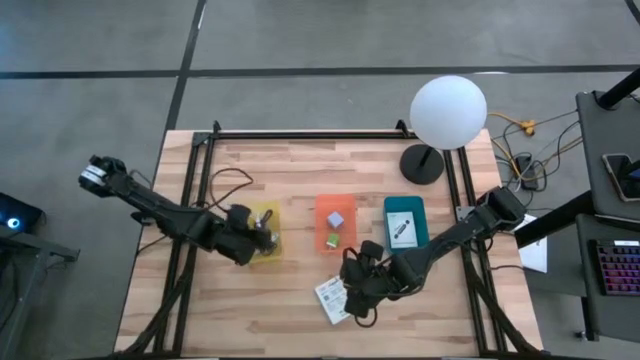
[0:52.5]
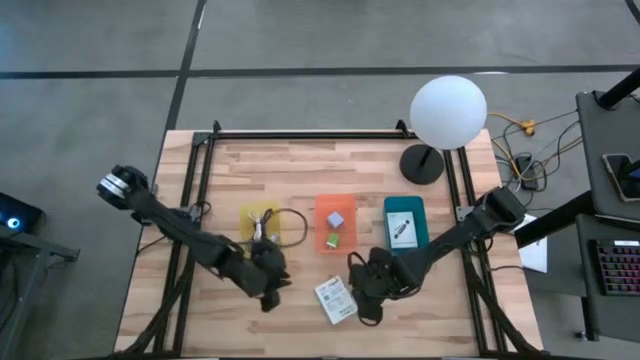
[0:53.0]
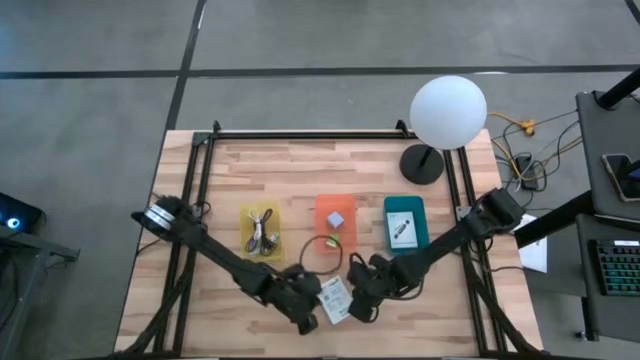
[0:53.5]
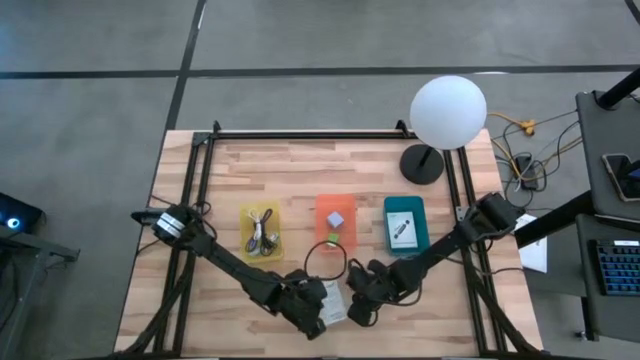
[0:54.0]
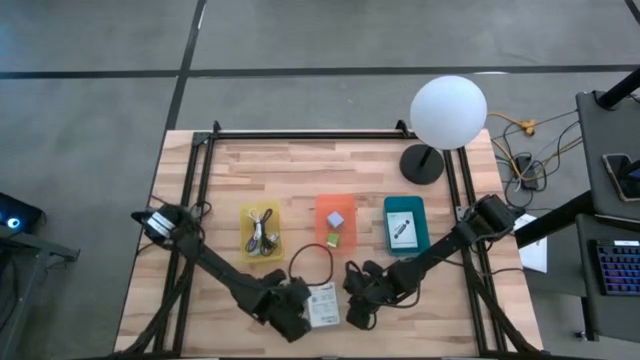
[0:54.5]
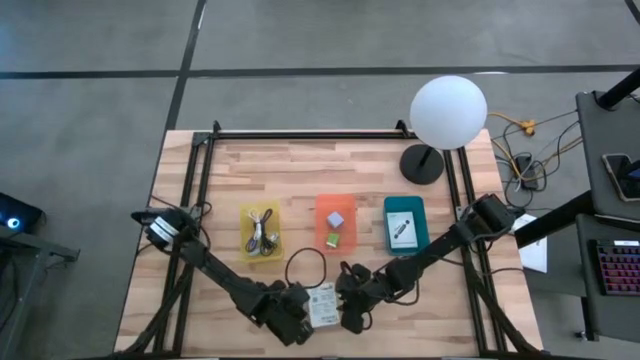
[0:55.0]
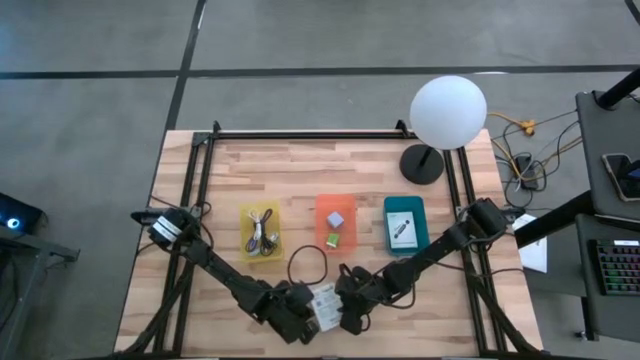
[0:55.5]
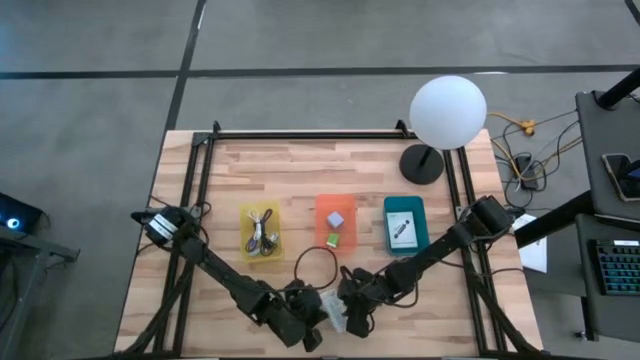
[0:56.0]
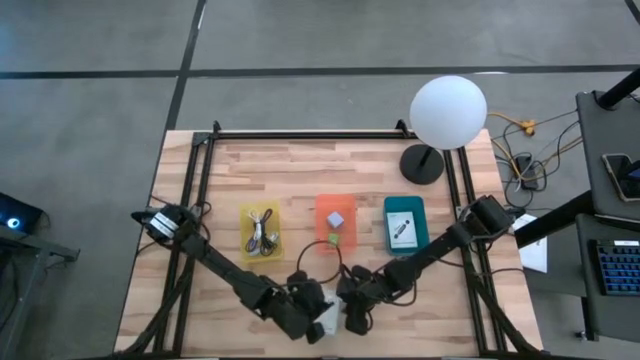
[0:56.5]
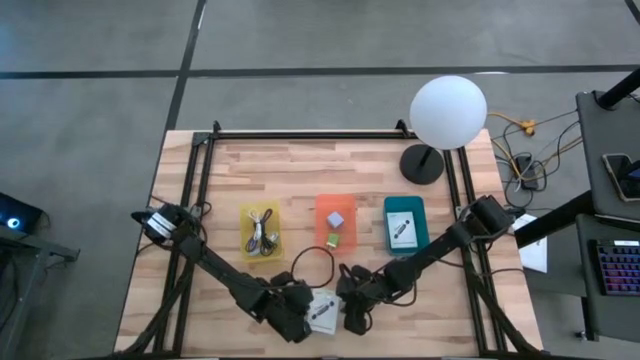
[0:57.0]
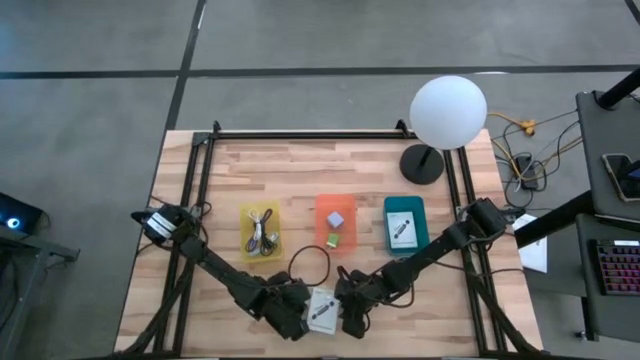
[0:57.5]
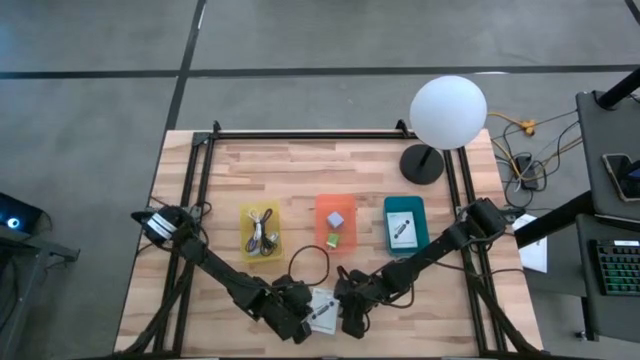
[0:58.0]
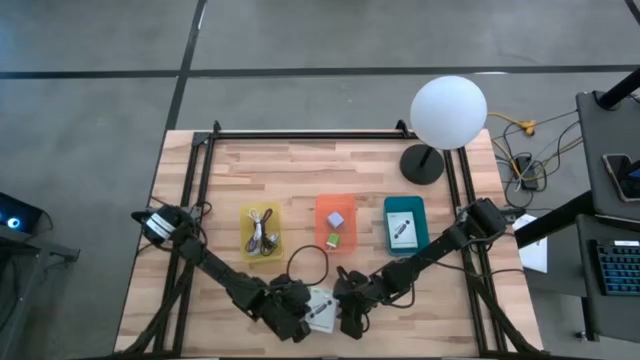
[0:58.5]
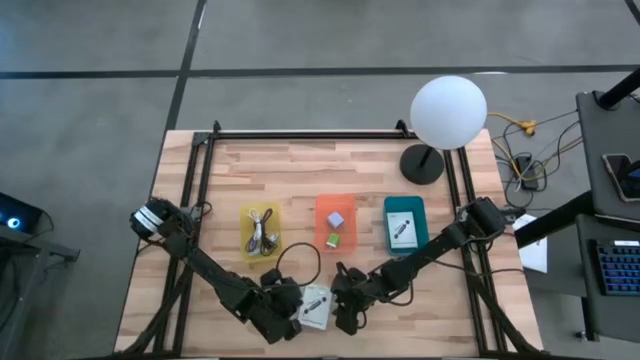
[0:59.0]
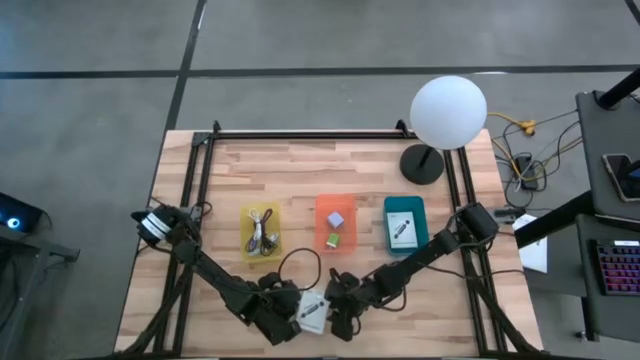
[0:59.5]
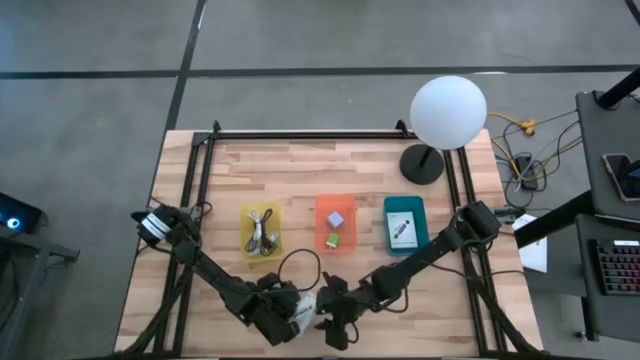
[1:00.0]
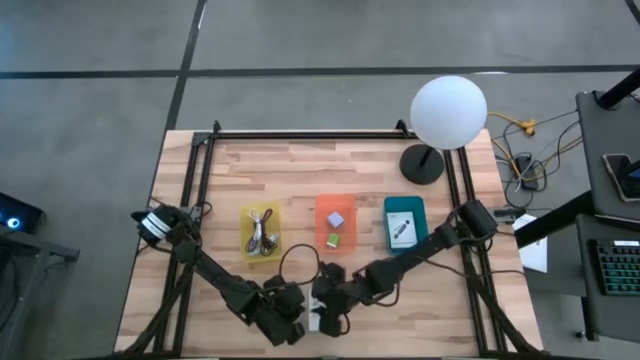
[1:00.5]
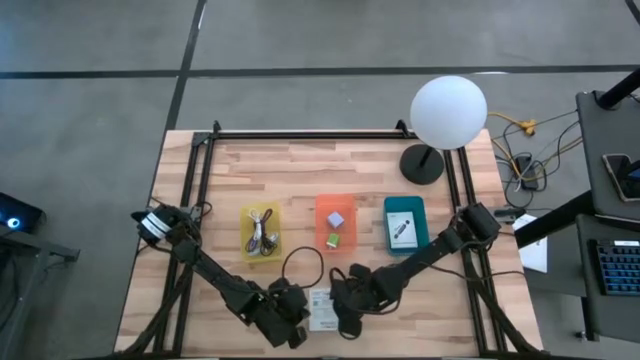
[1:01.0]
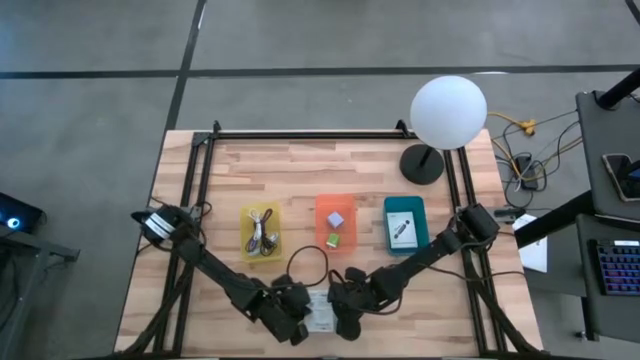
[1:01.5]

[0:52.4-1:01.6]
Task: Pick and place items into bin
Put the white card reader box into the blue bin

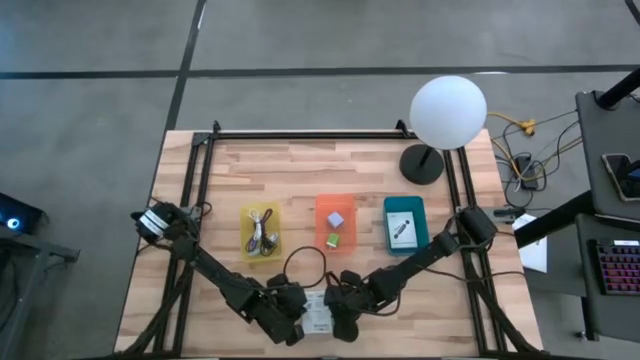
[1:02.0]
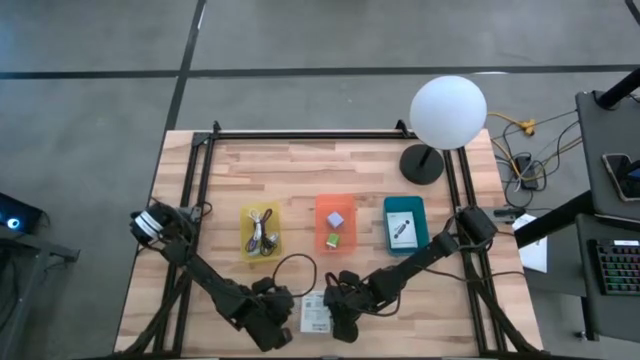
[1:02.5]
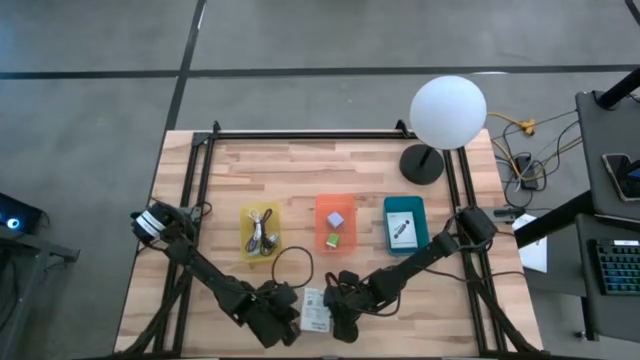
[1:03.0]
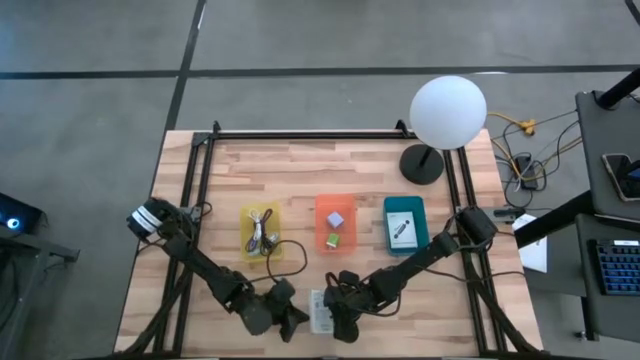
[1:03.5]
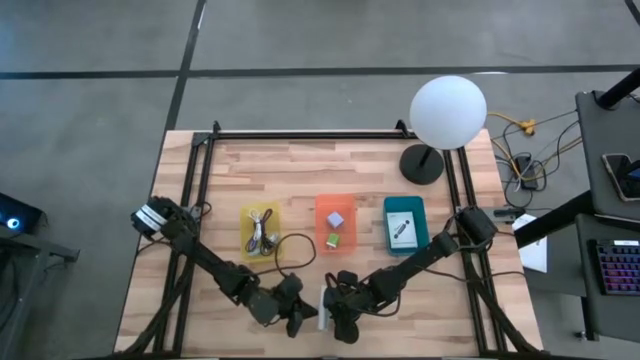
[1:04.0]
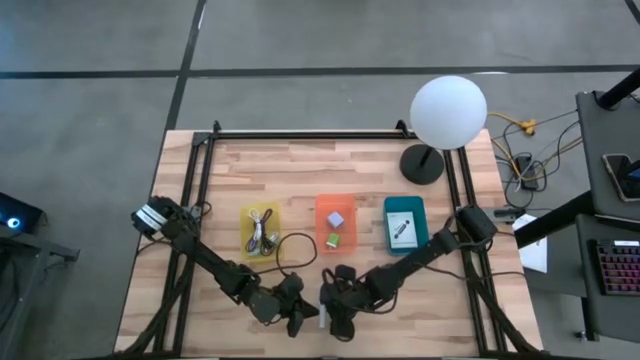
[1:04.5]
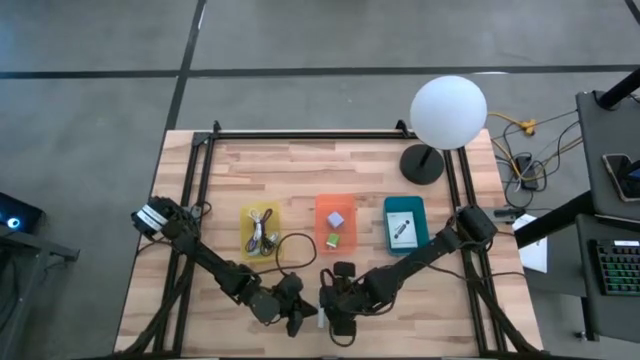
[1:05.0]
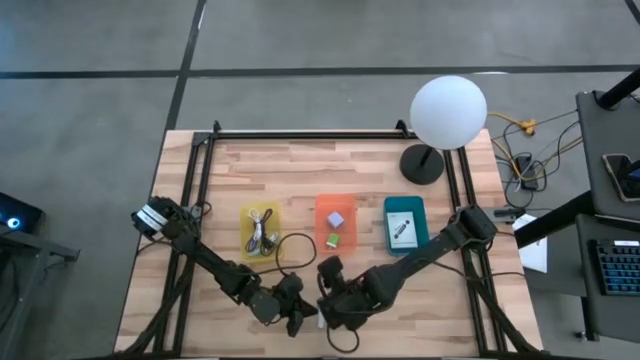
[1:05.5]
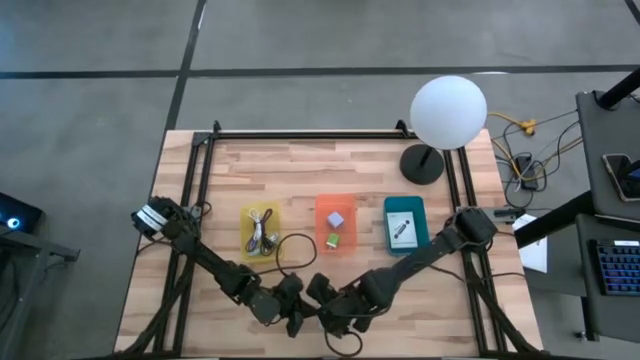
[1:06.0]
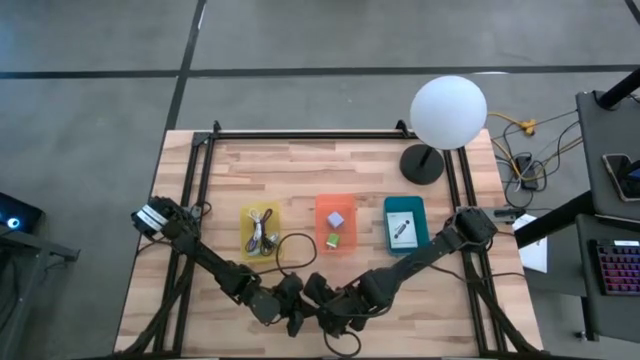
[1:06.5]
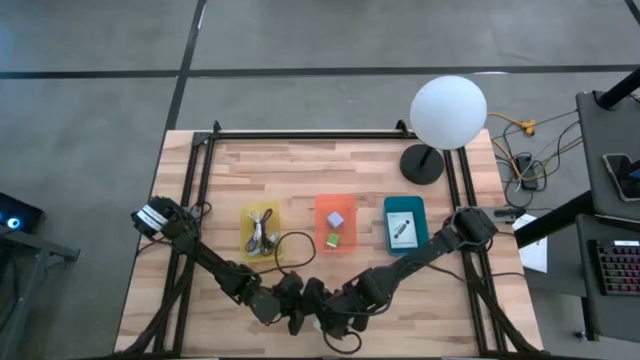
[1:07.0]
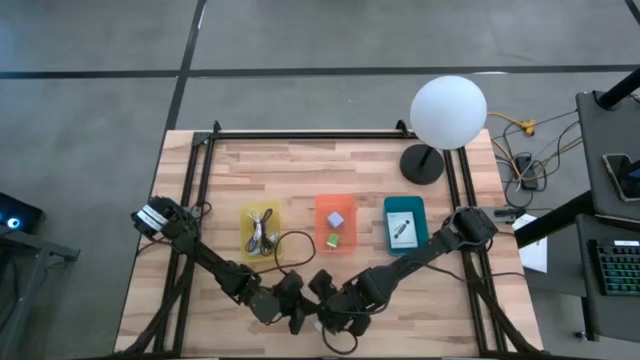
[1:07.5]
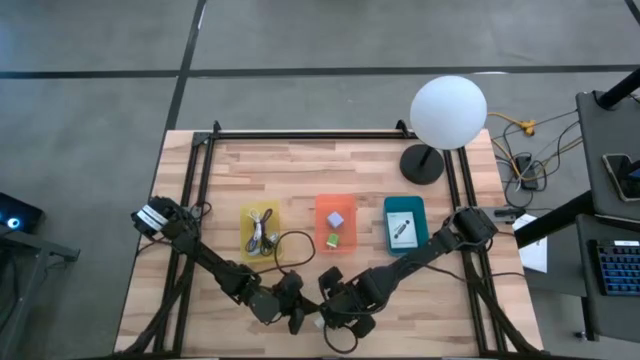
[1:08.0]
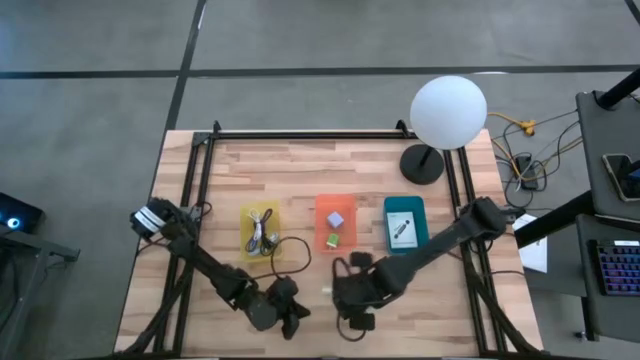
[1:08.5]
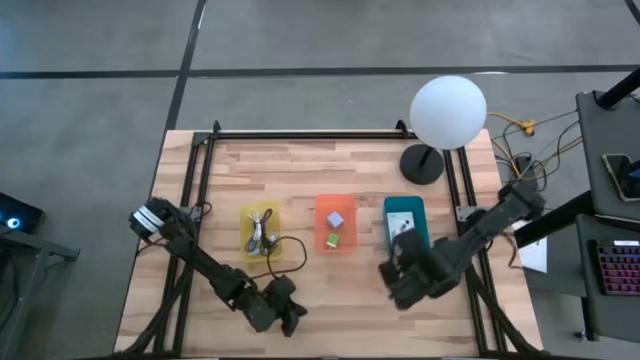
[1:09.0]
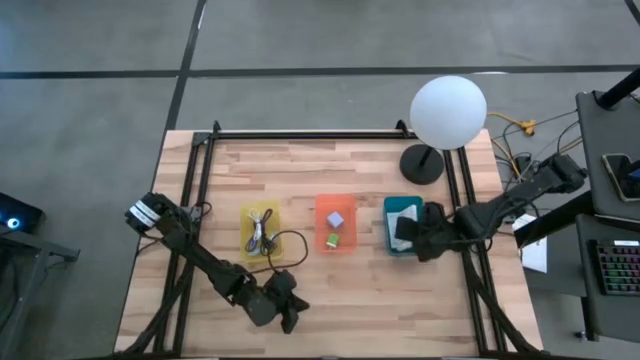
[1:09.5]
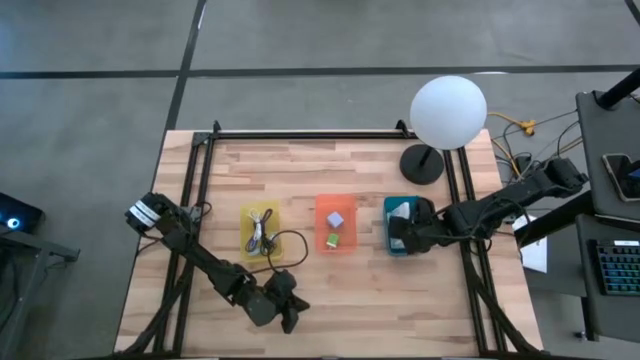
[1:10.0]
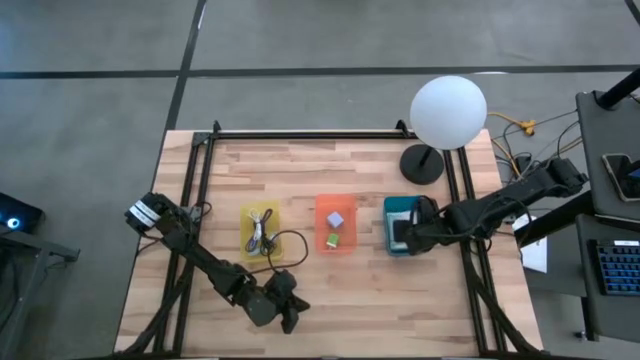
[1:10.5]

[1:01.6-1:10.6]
Put the white card reader box into the blue bin

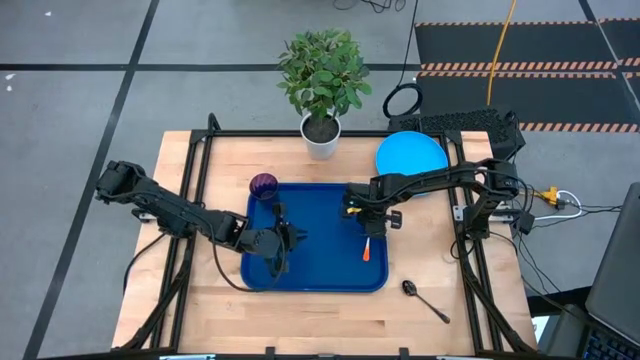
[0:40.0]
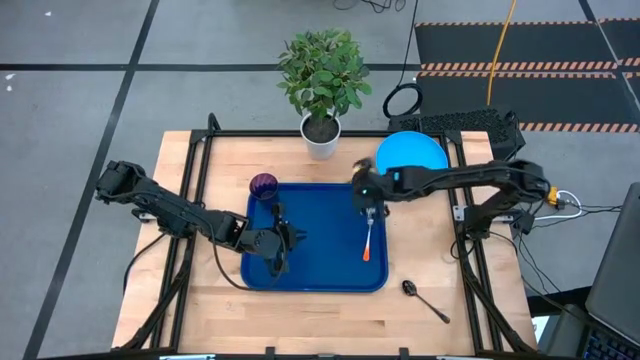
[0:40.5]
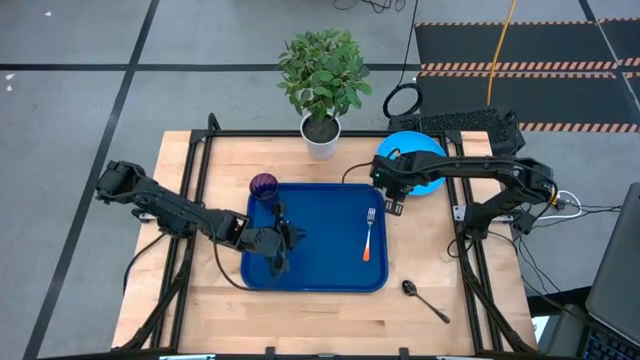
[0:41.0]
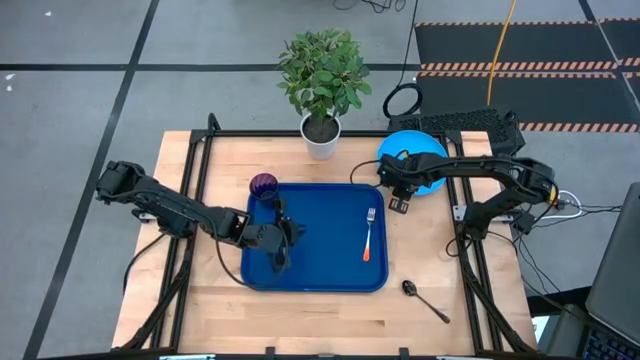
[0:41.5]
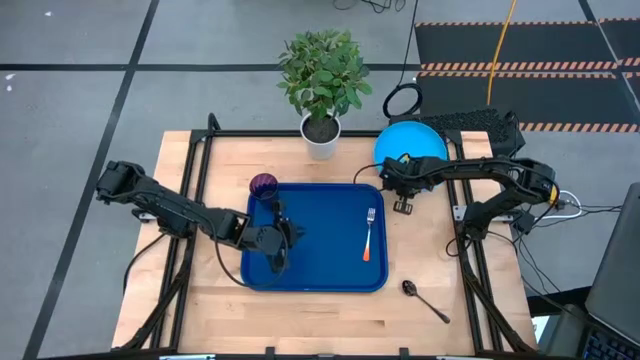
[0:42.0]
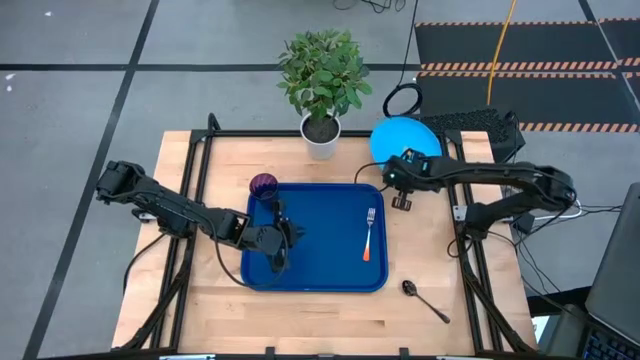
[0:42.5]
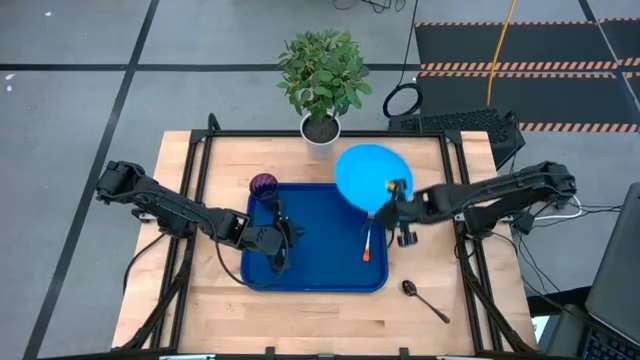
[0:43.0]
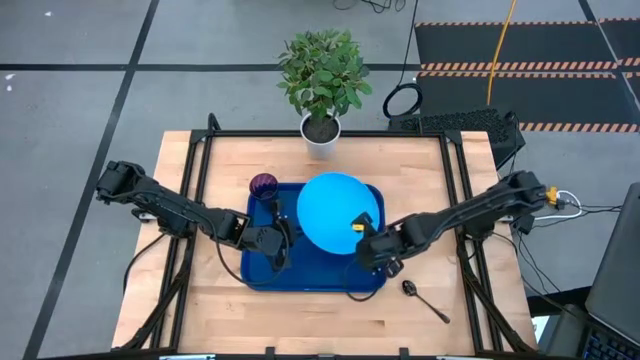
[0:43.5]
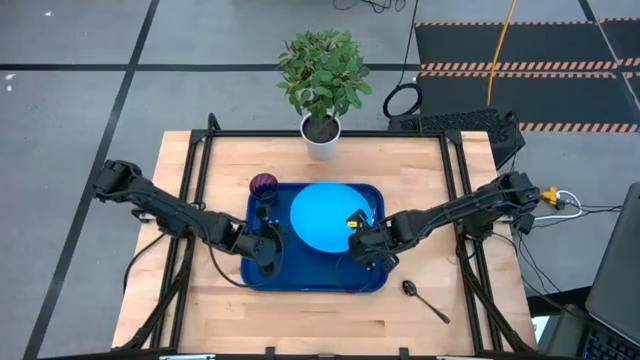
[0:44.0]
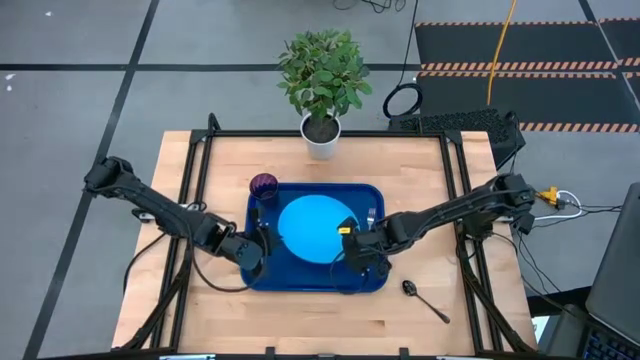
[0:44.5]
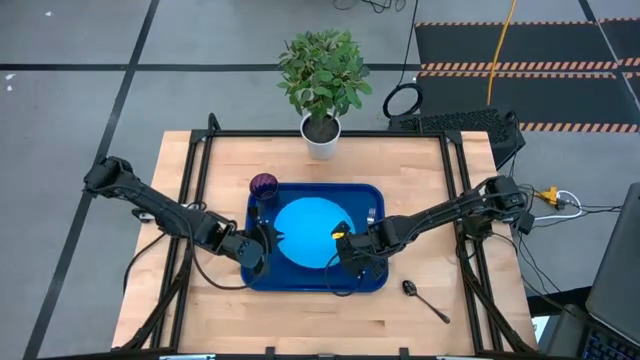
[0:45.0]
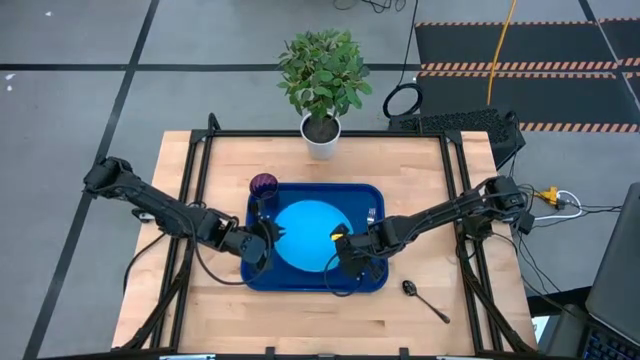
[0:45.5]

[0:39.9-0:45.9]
Task: Pick and place plate/cup/fork/spoon on tray
Put the light blue plate on the blue tray to the left of the orange fork
